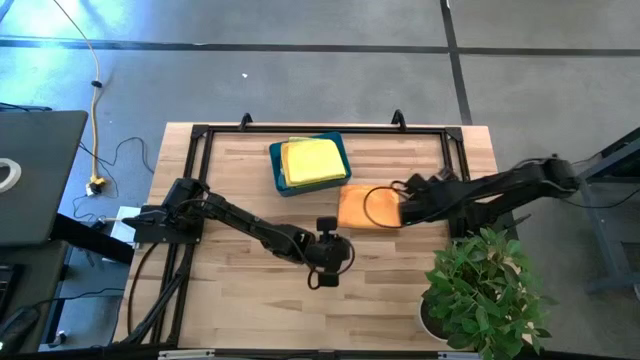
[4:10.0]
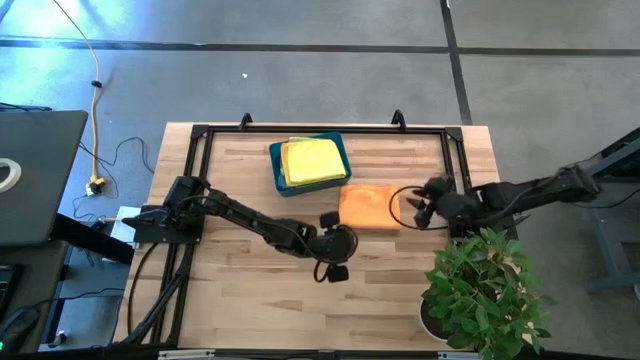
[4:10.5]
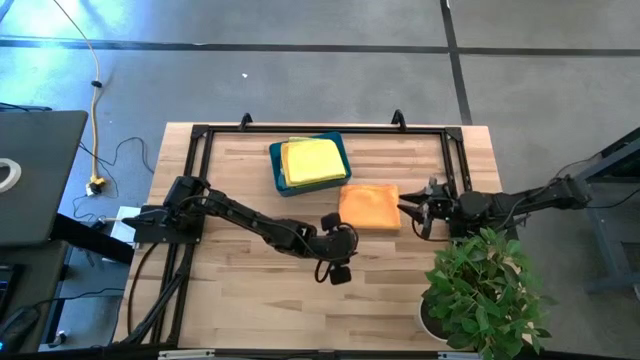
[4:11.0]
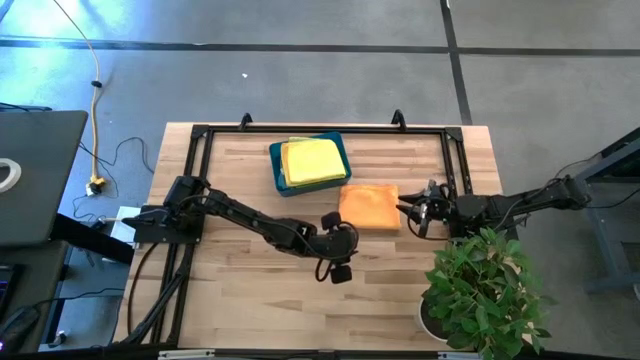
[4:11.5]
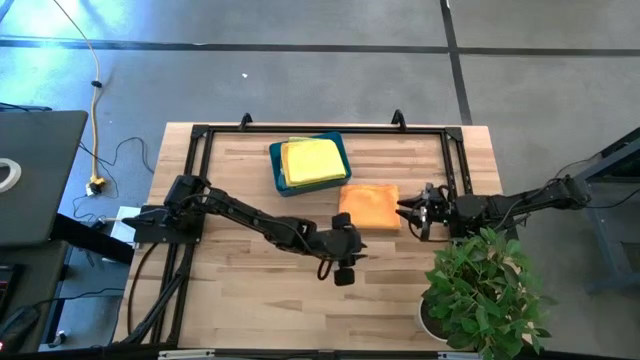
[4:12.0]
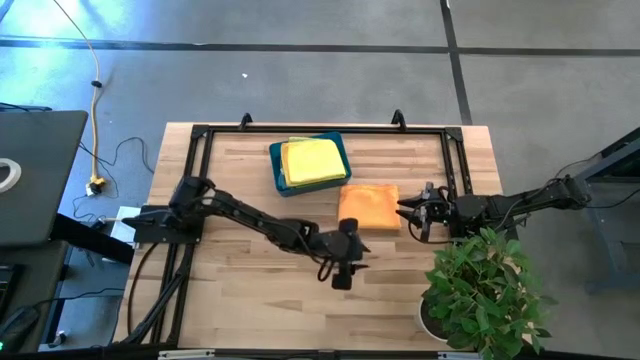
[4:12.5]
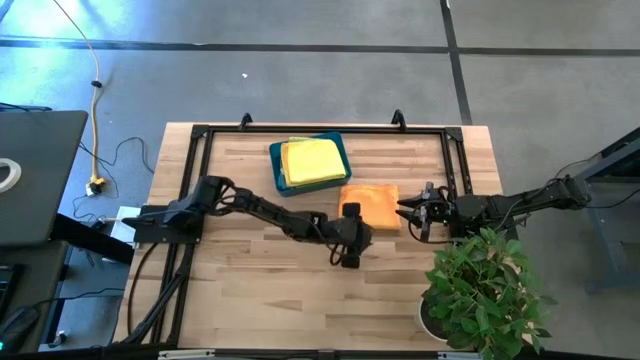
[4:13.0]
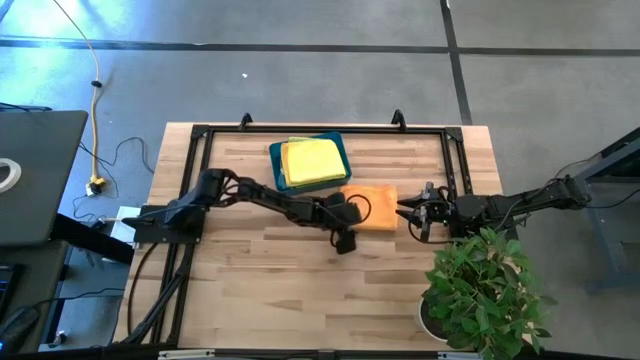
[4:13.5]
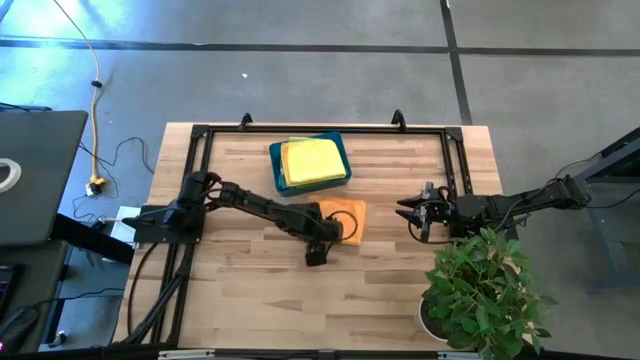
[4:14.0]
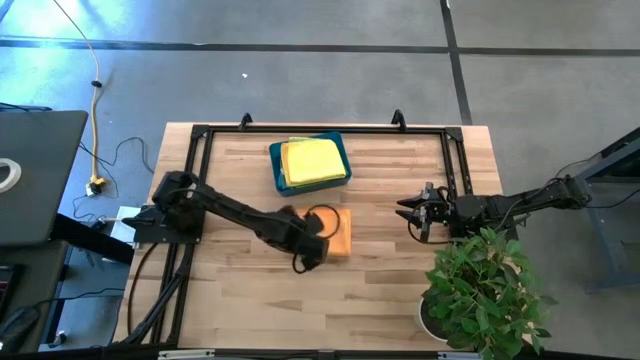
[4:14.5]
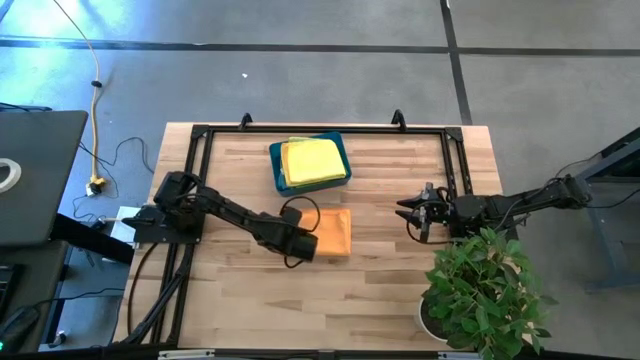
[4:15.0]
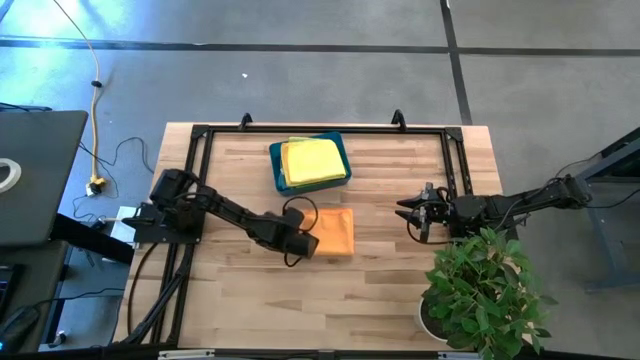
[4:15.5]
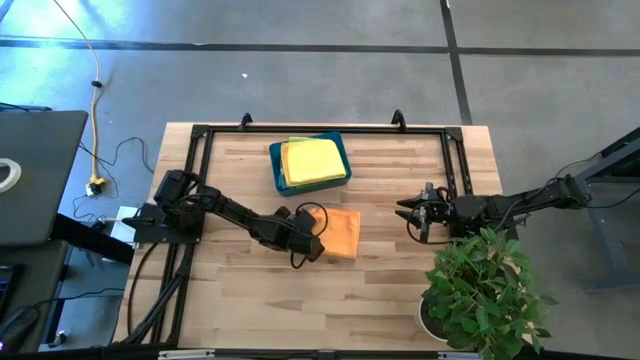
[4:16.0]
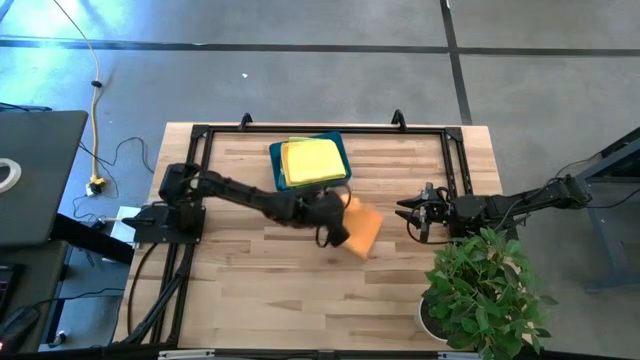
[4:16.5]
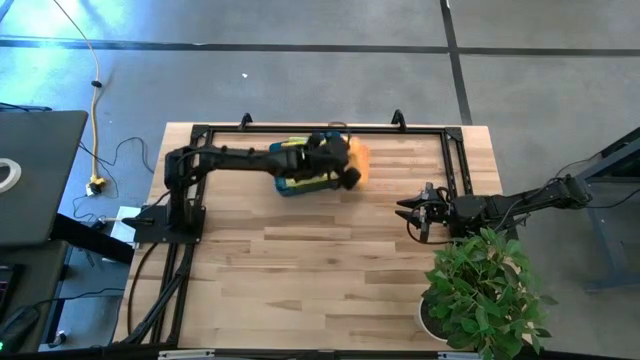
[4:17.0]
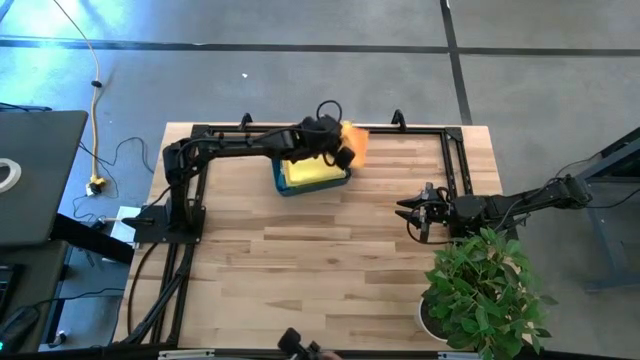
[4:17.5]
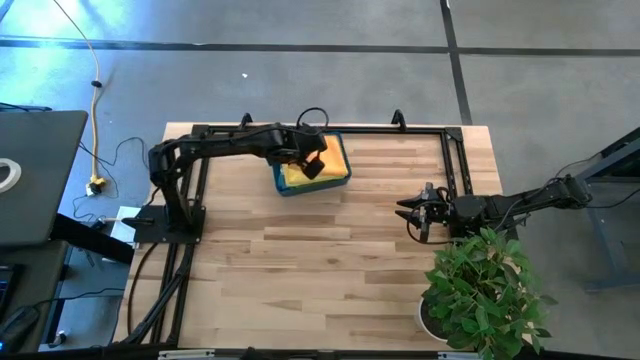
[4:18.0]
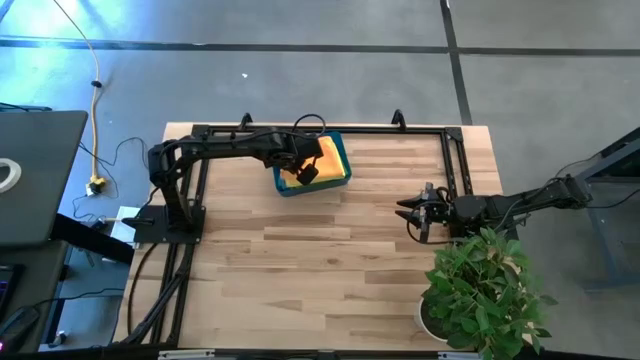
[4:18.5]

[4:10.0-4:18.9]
Task: Fold microfiber towels
Stack the orange microfiber cloth on the yellow microfiber cloth in the blue bin

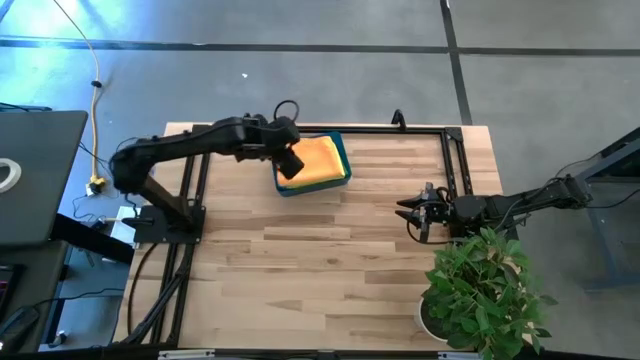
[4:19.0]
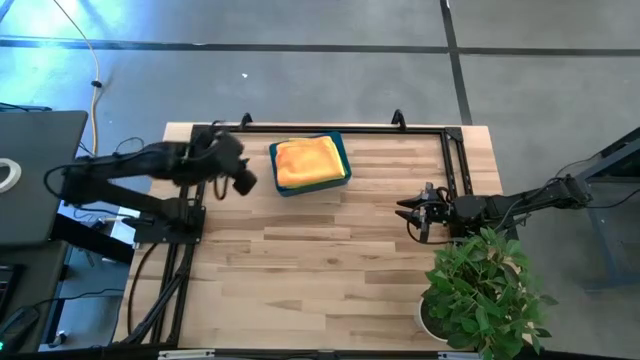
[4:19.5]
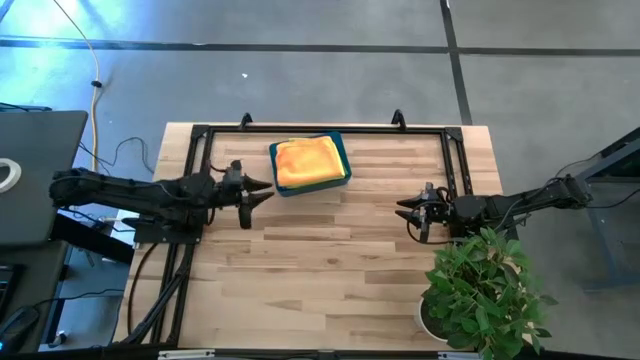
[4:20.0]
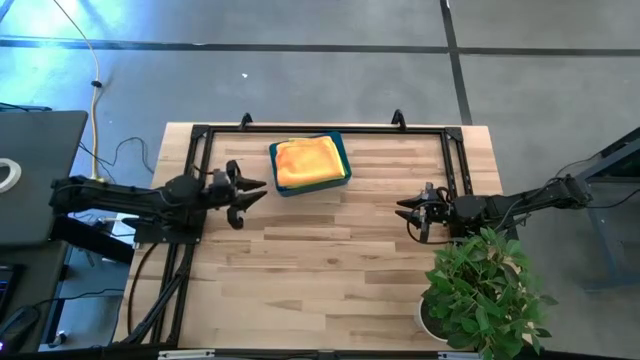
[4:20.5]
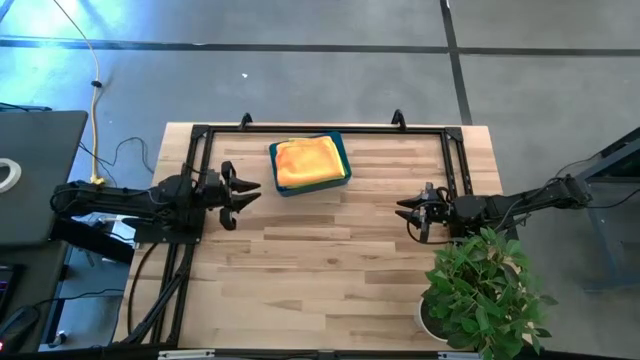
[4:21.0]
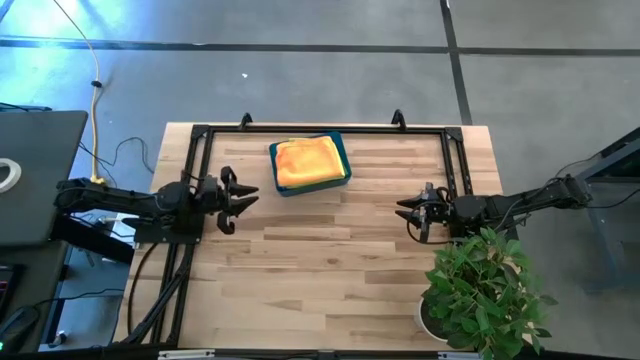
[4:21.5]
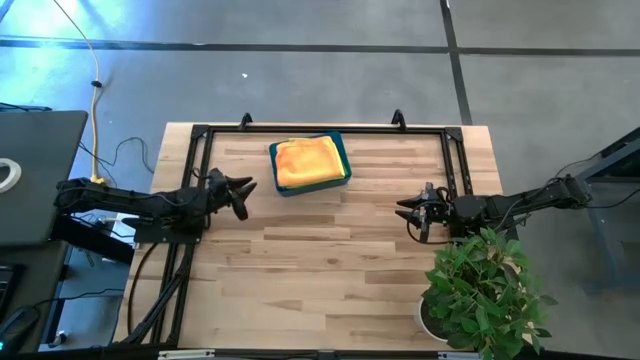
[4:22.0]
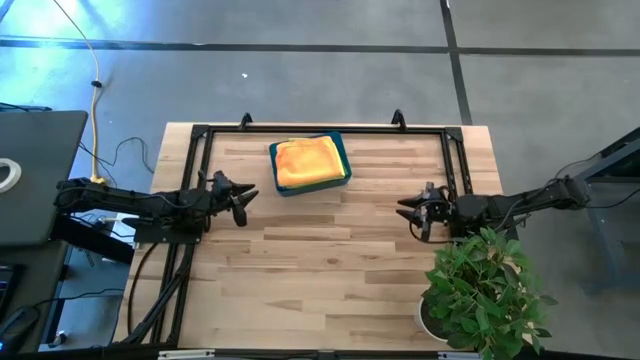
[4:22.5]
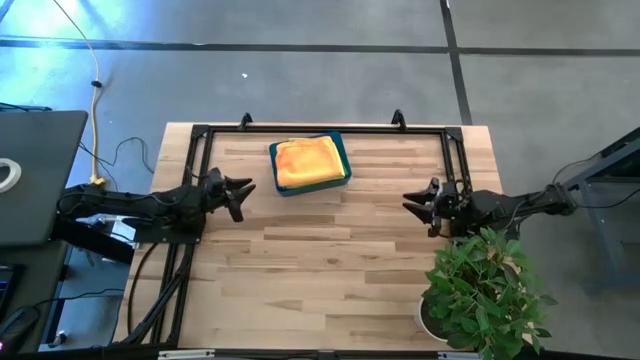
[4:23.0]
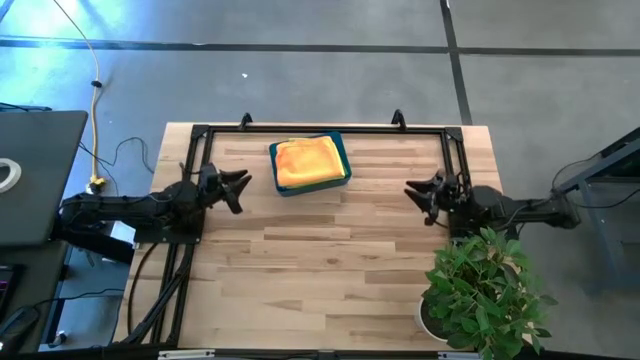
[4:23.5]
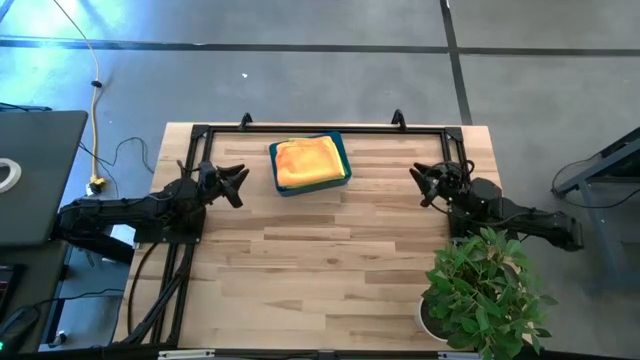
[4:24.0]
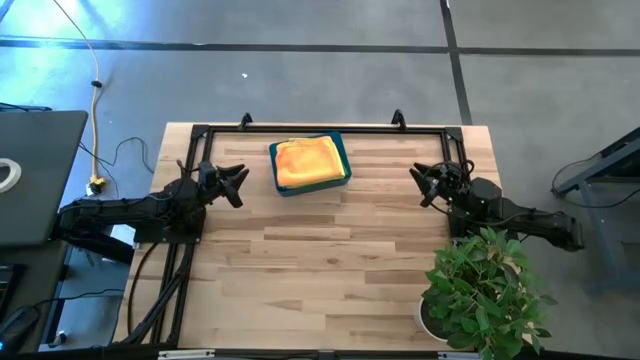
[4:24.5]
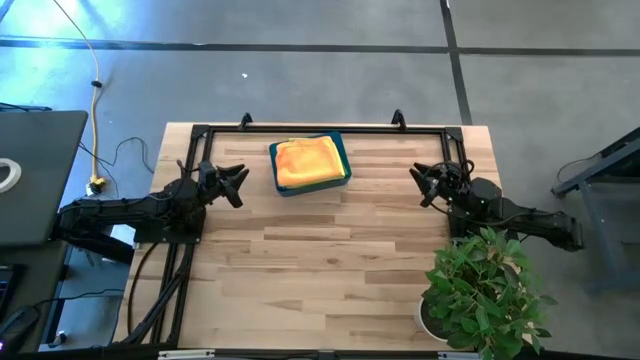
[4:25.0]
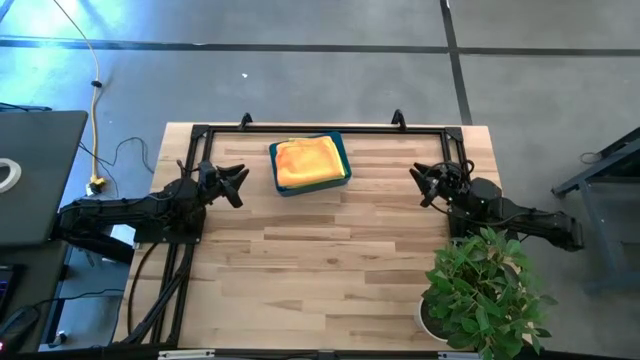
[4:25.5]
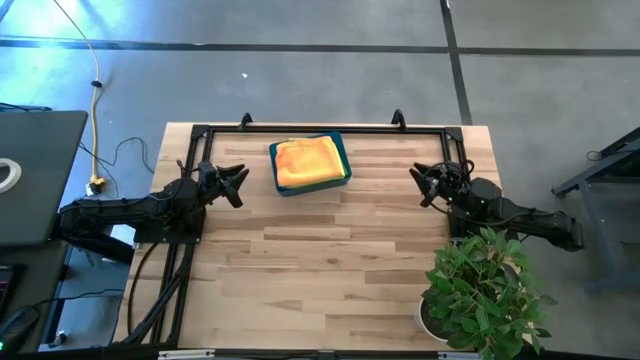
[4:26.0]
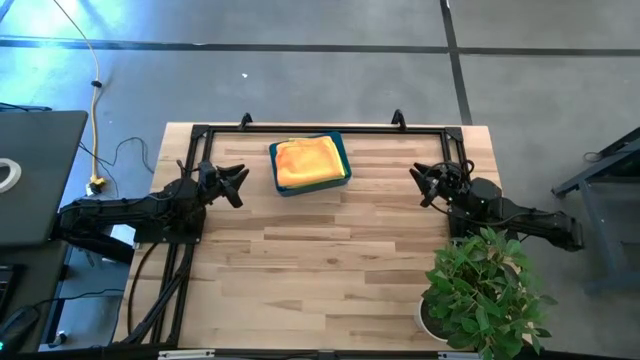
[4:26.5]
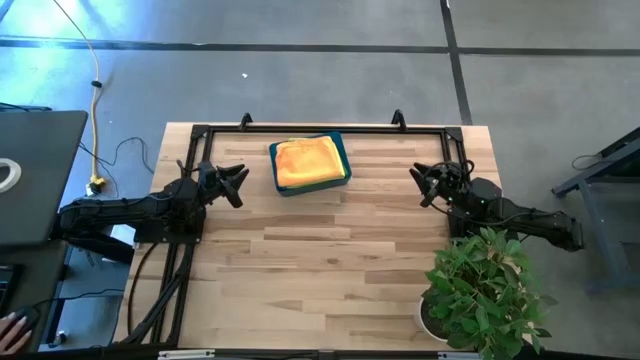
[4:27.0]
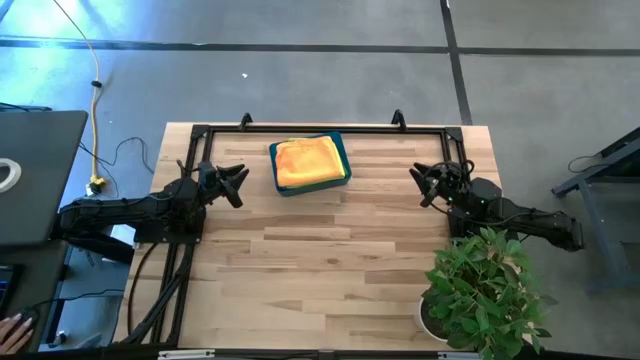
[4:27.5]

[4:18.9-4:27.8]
Return to Home Position
